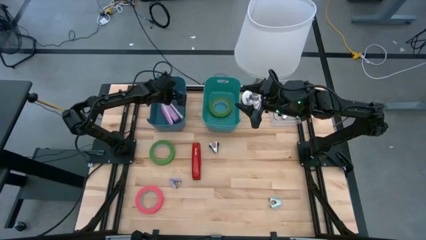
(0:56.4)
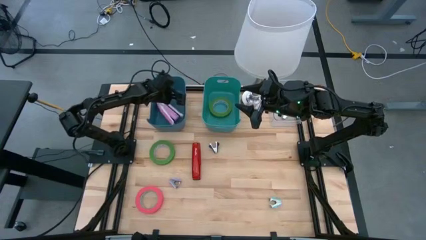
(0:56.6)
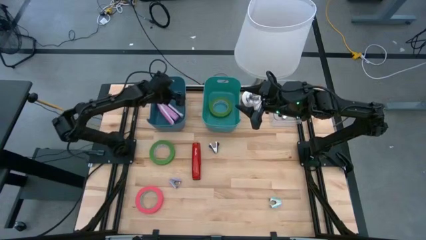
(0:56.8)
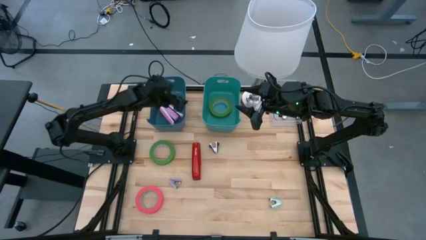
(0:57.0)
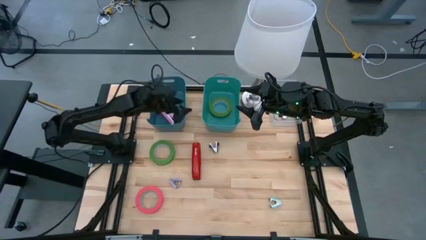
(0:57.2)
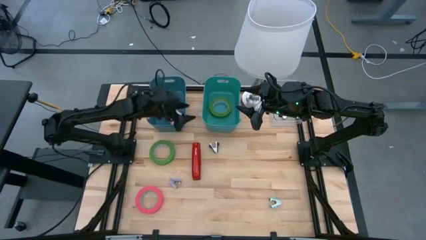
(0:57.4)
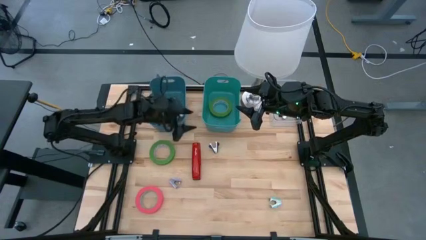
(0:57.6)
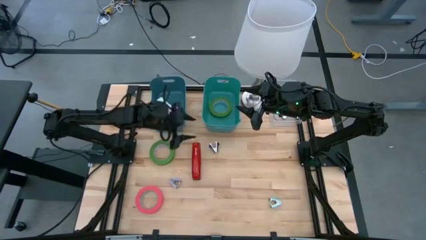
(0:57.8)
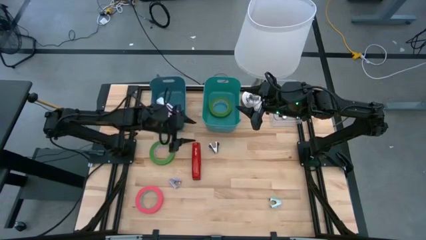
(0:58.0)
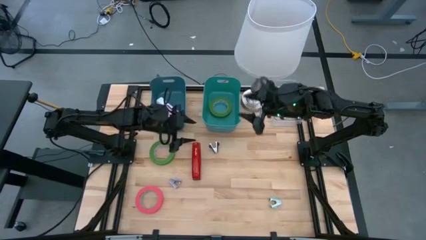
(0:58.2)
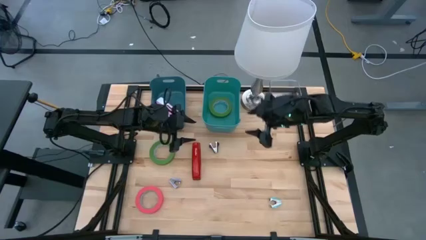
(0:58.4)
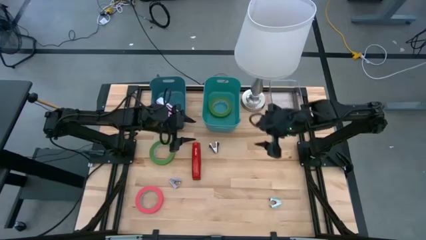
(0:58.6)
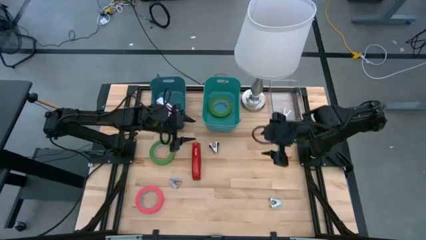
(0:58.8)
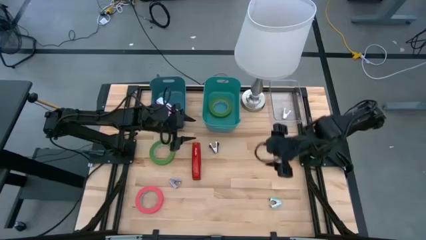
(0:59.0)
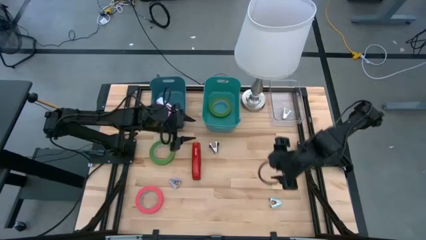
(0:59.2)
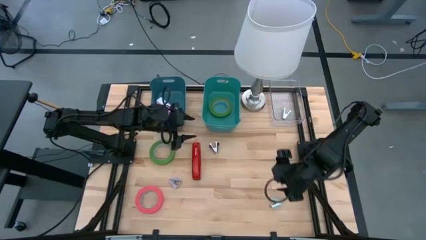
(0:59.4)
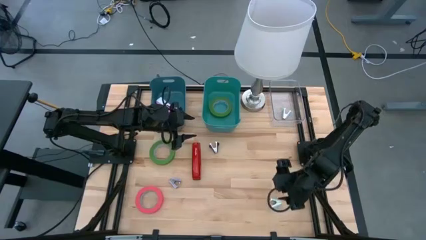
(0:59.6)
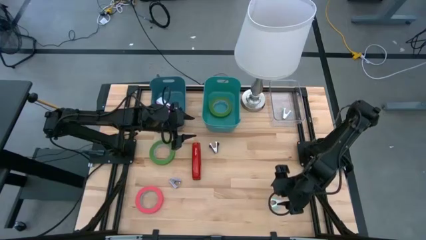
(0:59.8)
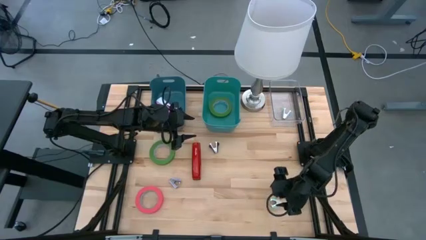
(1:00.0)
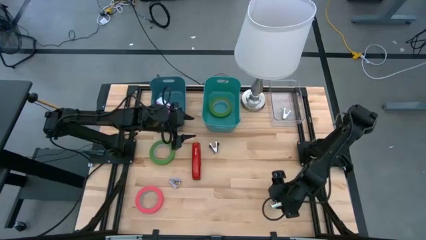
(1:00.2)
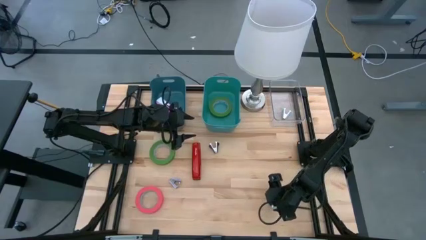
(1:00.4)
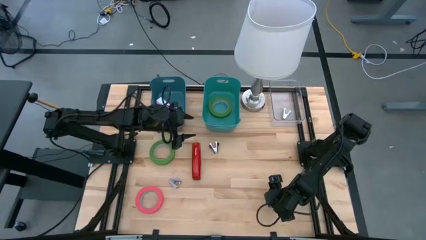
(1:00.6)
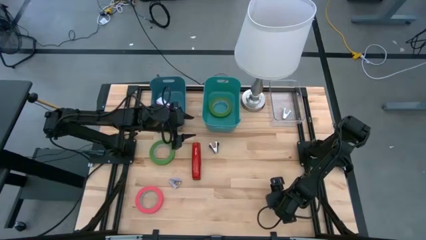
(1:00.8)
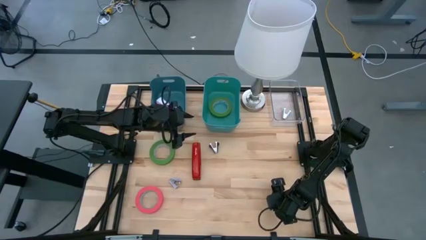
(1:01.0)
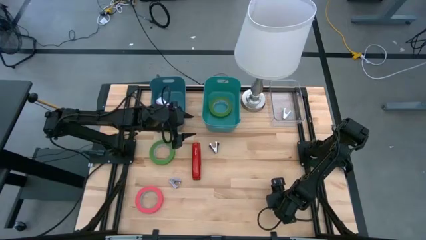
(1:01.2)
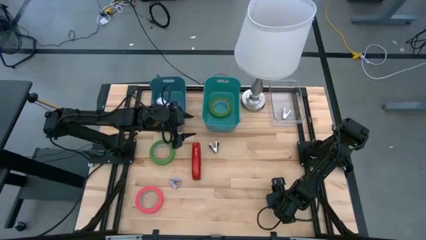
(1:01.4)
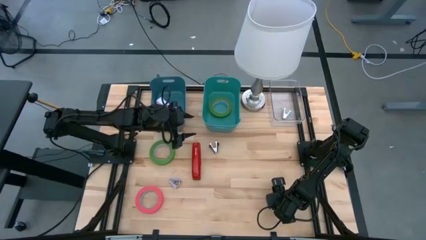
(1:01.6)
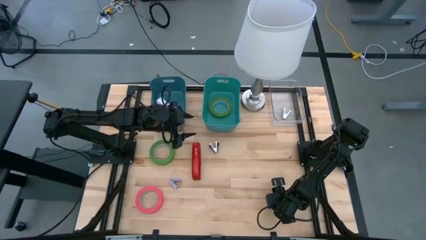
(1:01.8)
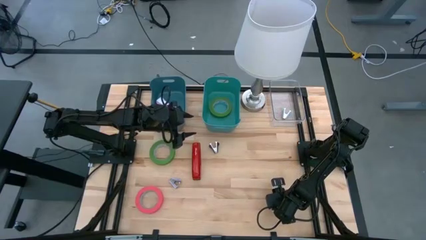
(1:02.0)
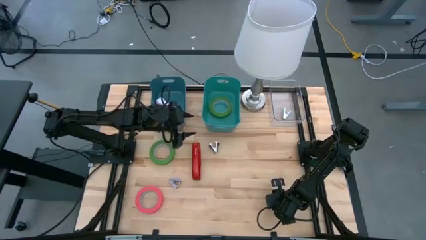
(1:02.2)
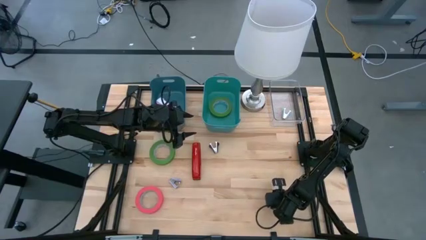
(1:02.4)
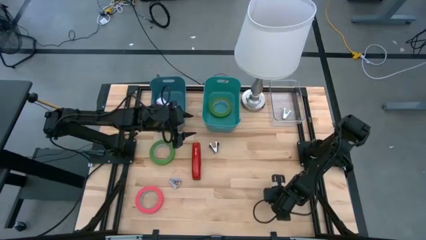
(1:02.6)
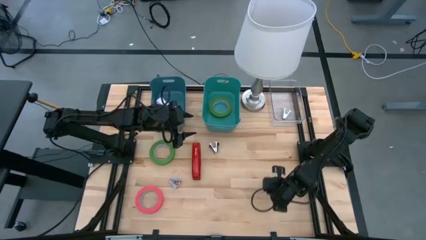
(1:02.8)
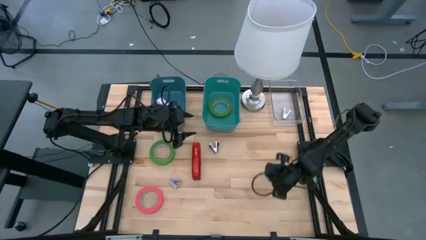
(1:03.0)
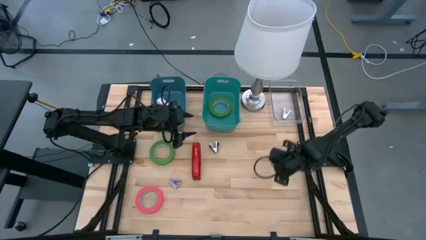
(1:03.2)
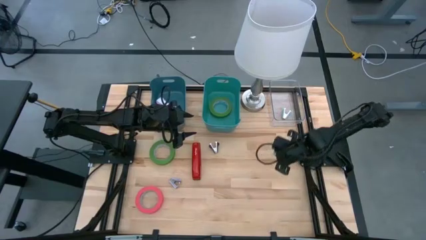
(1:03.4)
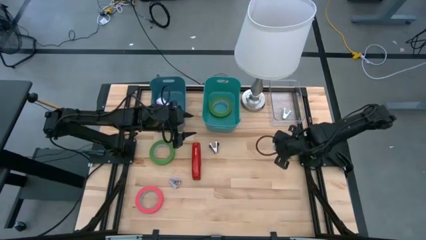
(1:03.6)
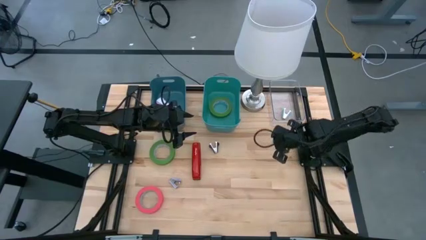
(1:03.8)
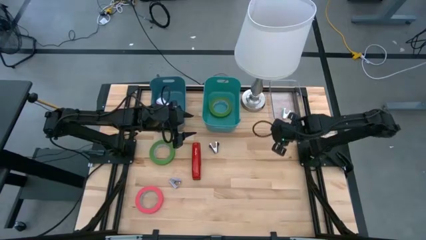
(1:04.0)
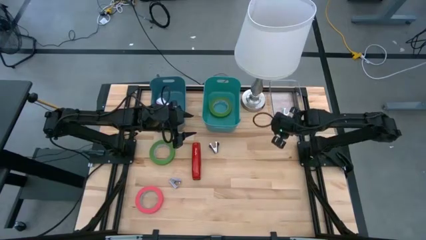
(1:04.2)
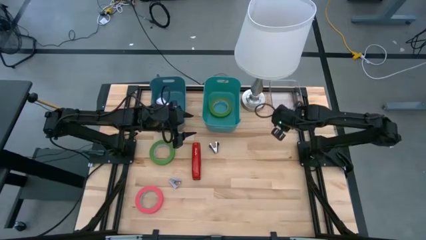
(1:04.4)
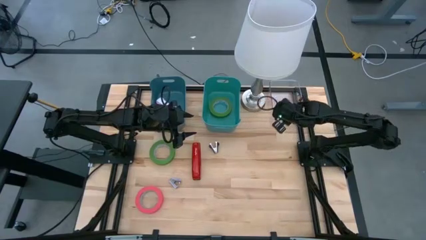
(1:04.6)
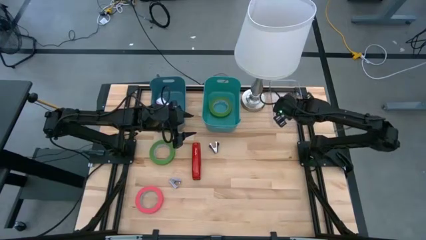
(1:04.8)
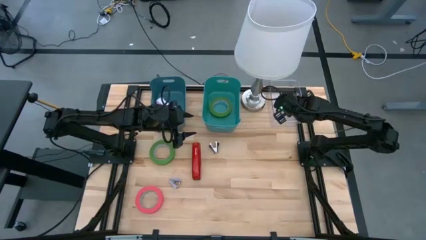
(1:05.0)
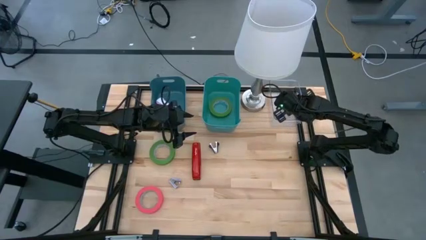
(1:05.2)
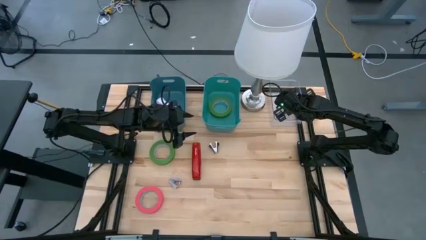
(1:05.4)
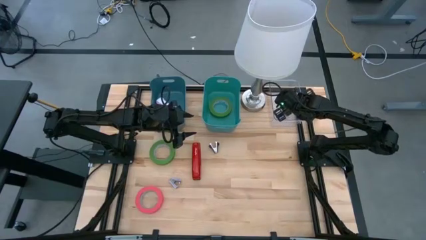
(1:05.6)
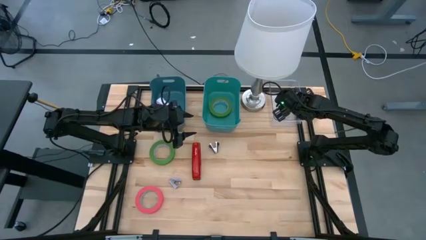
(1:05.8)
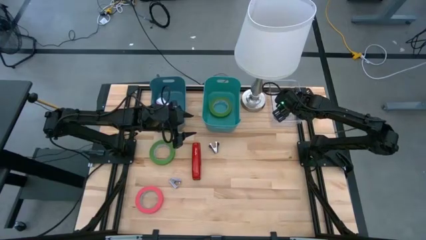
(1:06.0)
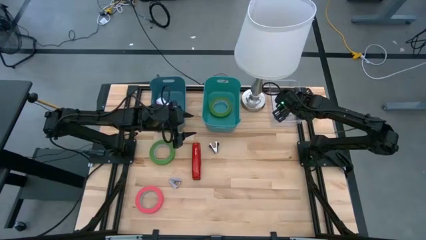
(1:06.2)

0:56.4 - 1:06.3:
Task: Pick and place Stapler, Stapler remover, tape
Put the blue staple remover into the transparent bin

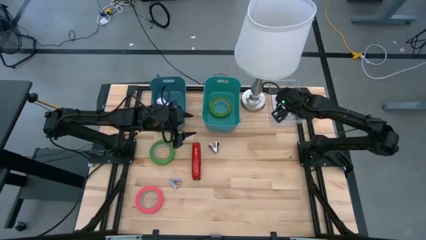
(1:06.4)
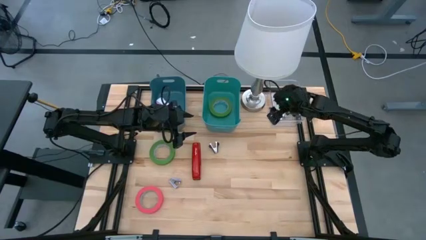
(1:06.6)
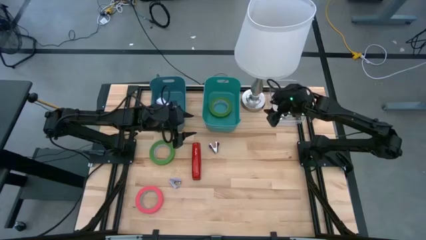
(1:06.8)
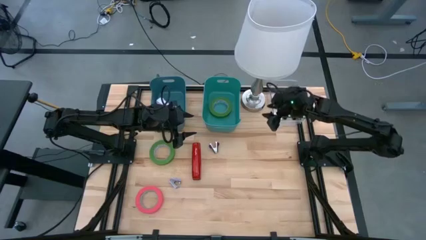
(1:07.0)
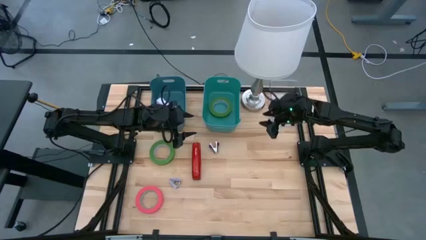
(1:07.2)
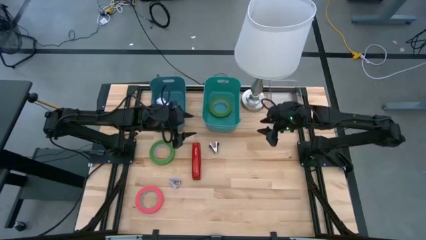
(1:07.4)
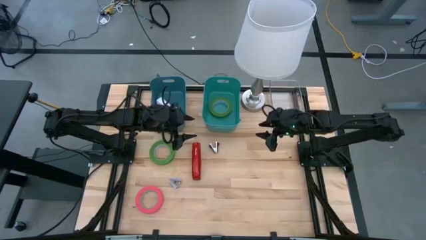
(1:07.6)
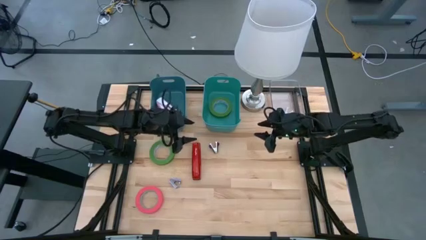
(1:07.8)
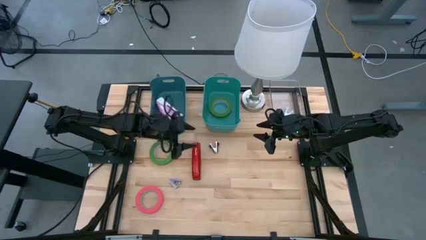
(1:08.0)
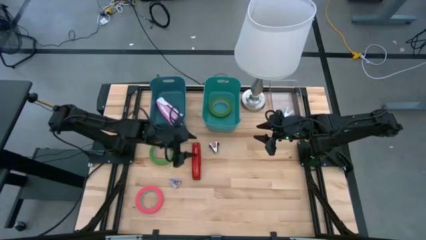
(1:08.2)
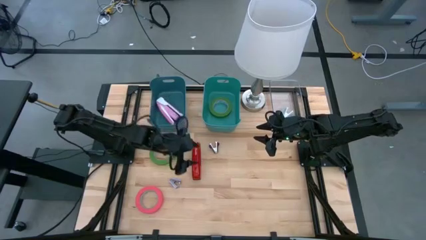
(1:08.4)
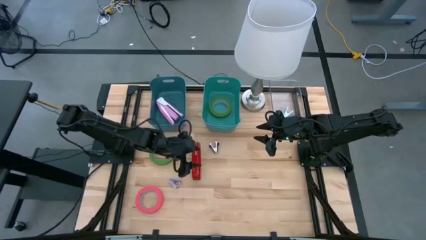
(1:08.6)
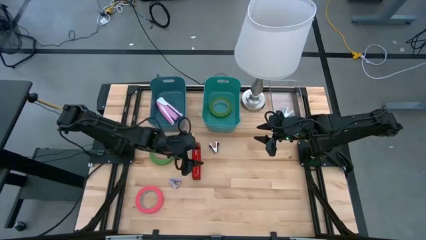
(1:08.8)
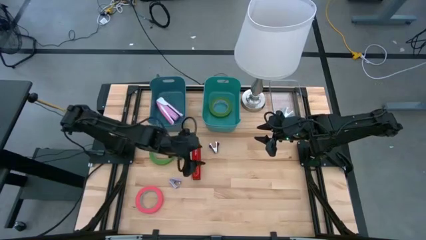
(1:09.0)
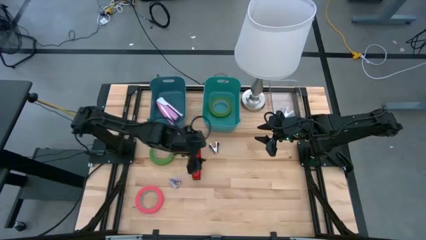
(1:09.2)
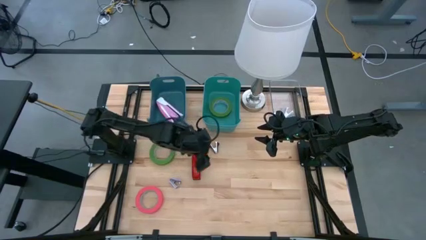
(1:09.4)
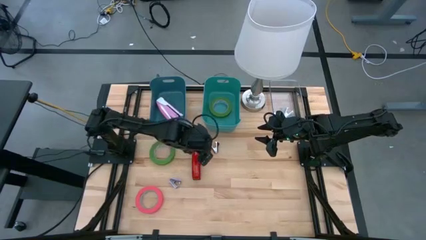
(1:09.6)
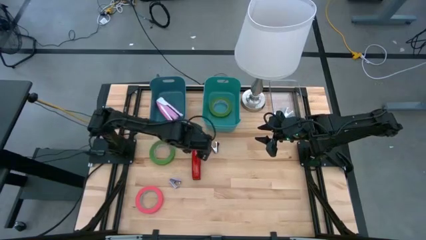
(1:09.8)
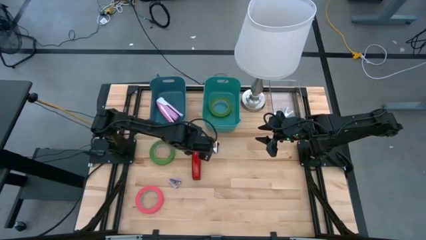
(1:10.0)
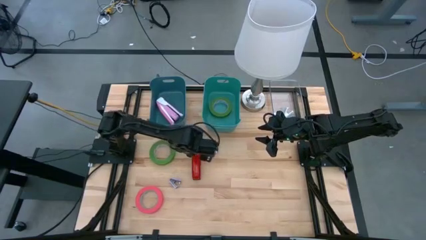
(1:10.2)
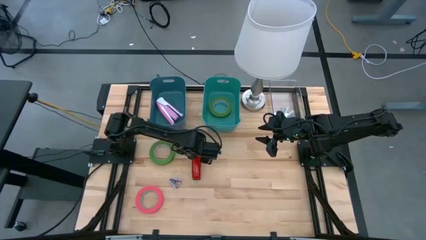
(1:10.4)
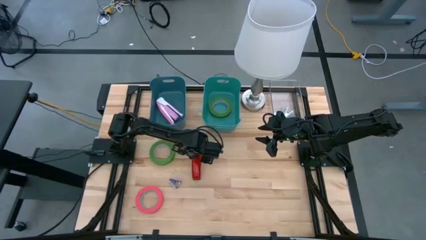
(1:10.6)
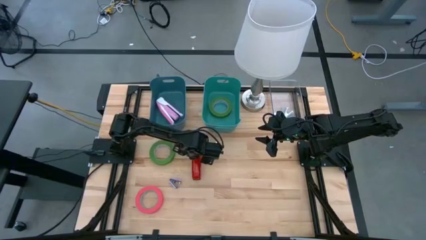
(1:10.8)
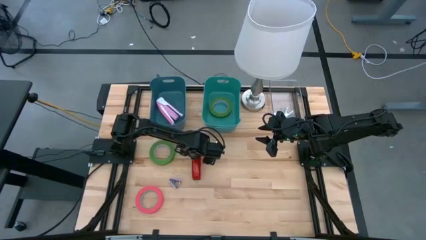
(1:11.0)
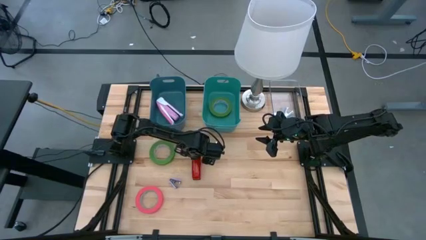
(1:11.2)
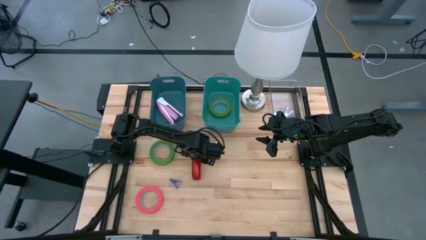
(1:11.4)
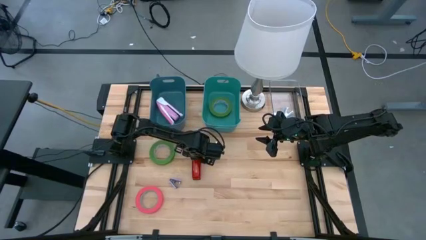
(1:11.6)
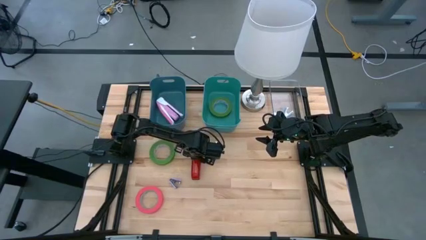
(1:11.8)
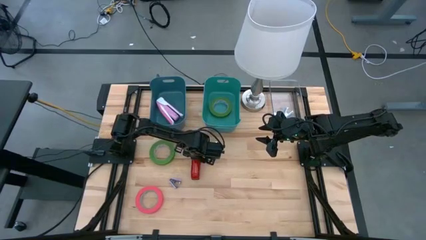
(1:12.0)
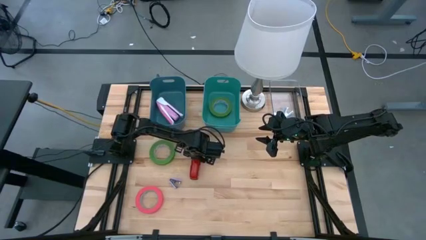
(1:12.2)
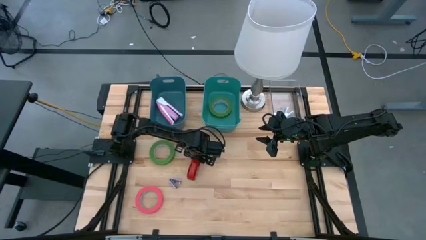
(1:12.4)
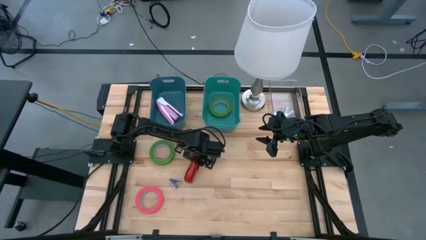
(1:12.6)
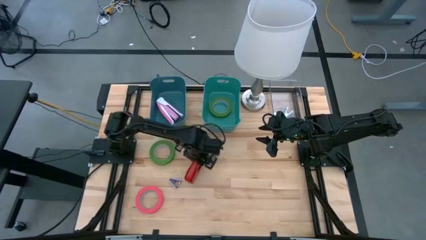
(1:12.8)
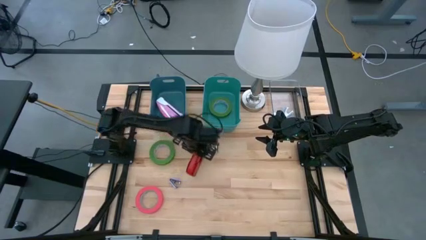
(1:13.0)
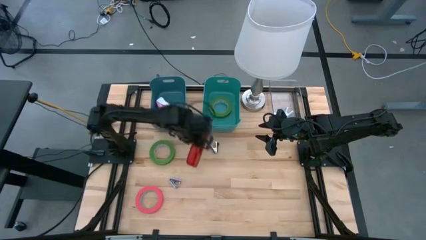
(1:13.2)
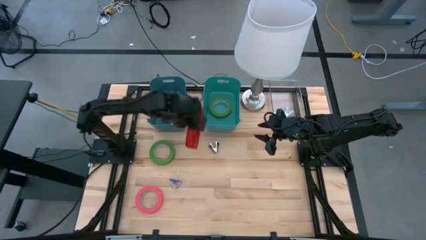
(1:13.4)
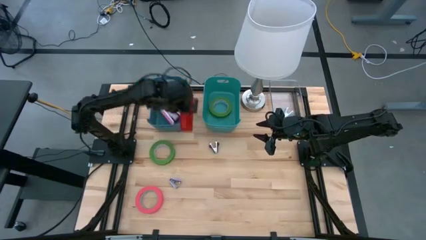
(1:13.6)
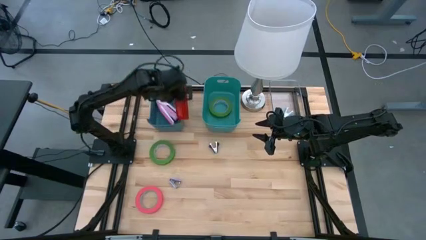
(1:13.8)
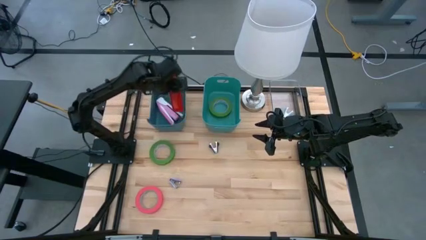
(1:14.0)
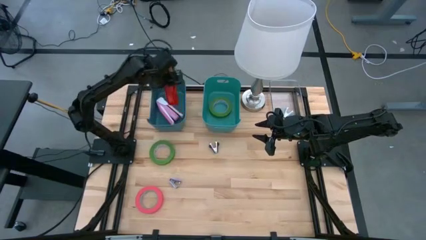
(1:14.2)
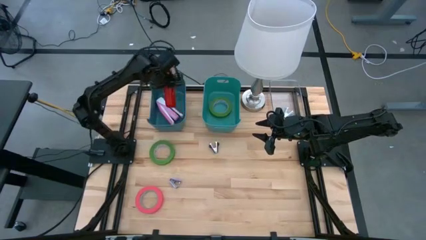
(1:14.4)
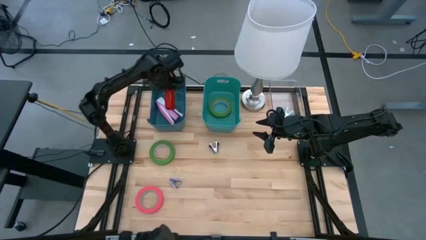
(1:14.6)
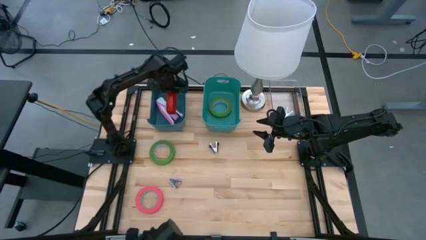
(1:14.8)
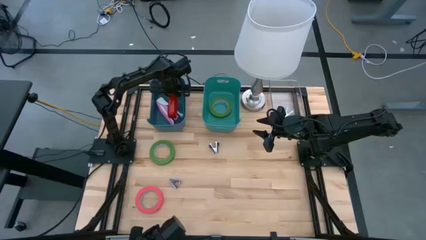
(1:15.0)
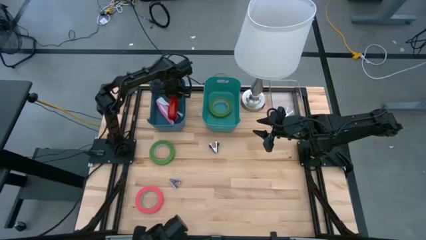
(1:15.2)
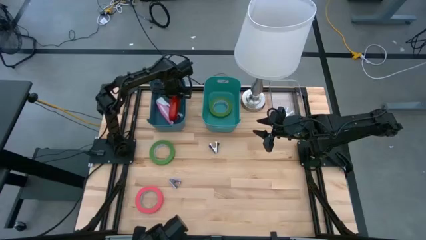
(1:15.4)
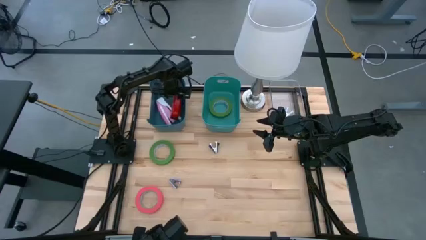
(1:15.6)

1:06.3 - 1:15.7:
Put the red stapler into the blue bin
